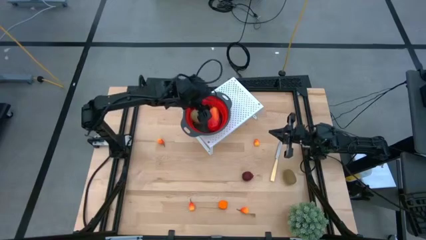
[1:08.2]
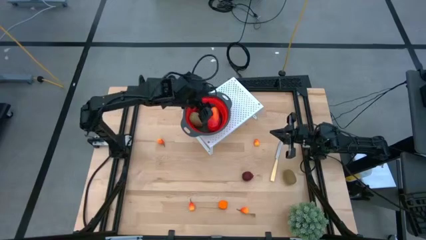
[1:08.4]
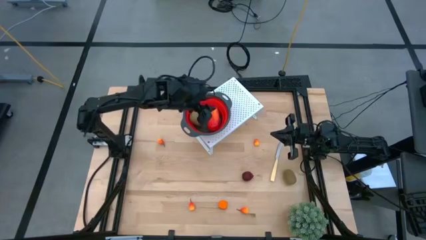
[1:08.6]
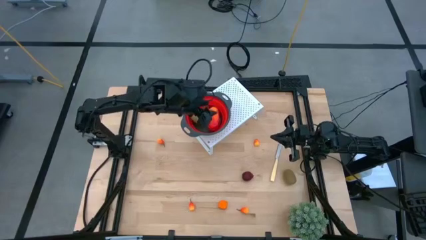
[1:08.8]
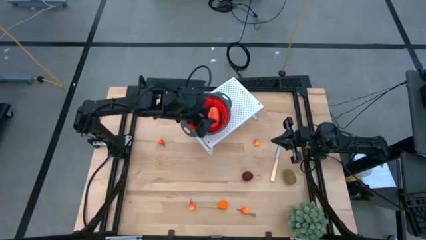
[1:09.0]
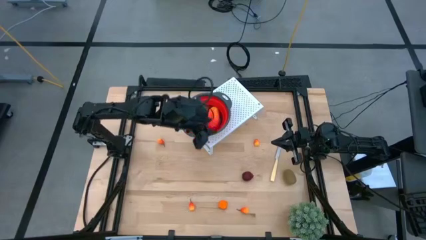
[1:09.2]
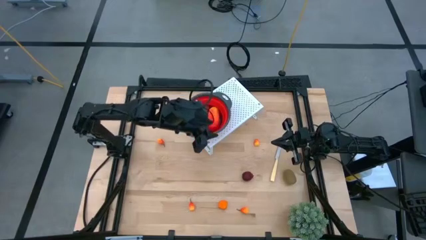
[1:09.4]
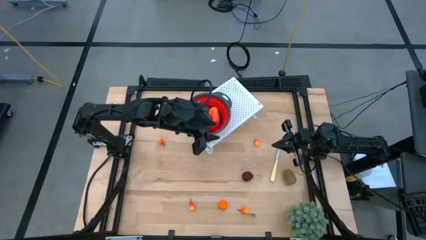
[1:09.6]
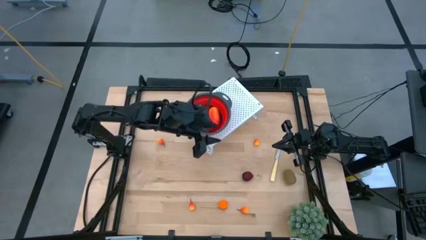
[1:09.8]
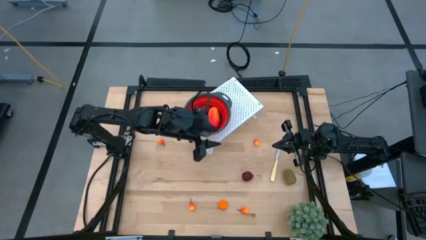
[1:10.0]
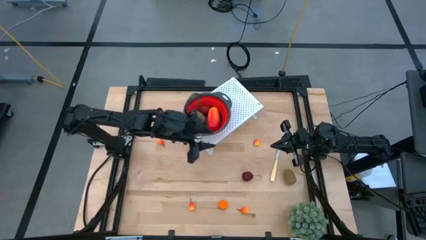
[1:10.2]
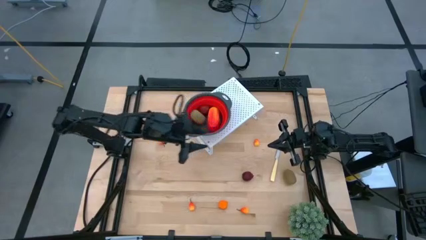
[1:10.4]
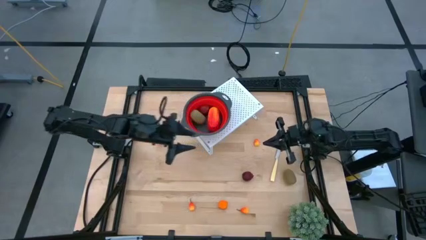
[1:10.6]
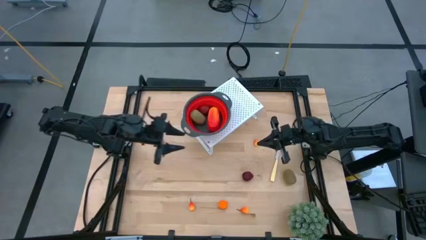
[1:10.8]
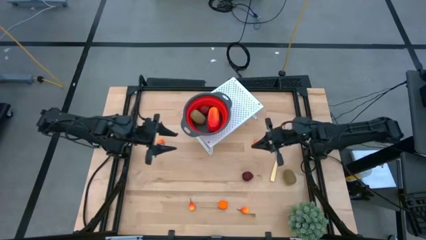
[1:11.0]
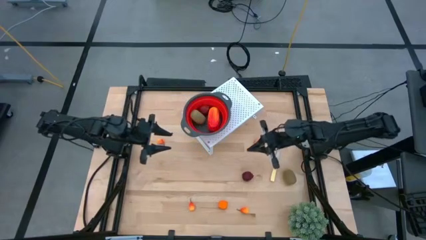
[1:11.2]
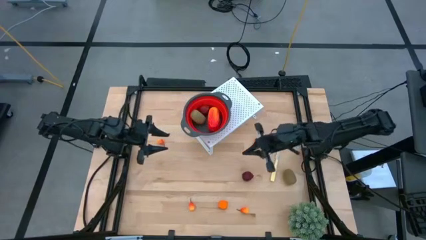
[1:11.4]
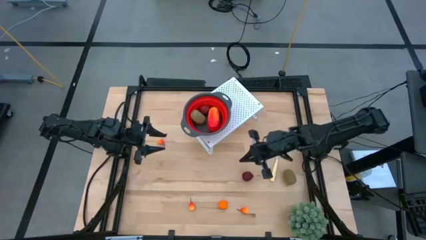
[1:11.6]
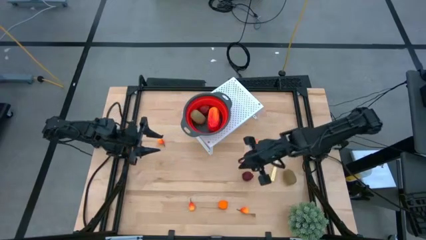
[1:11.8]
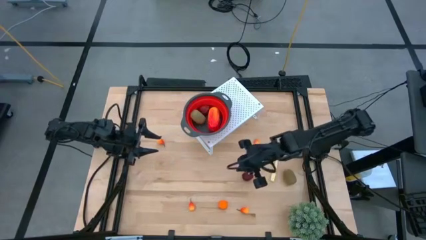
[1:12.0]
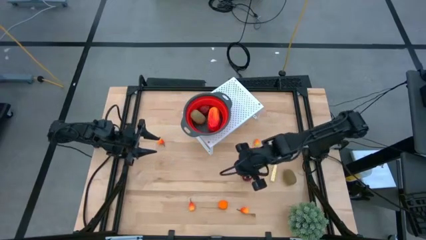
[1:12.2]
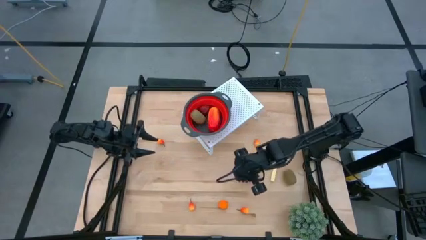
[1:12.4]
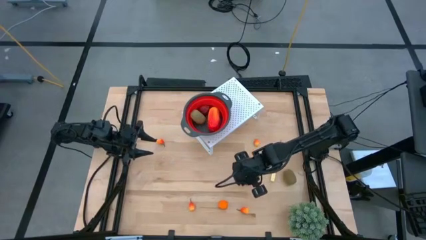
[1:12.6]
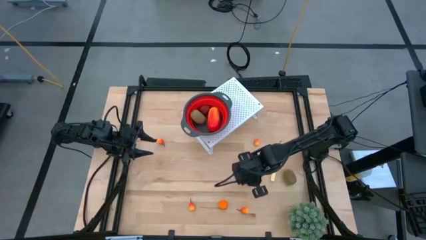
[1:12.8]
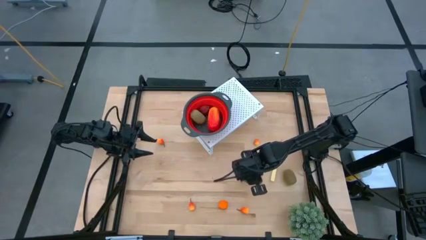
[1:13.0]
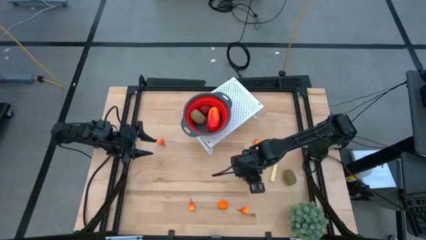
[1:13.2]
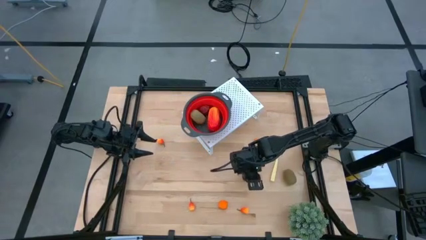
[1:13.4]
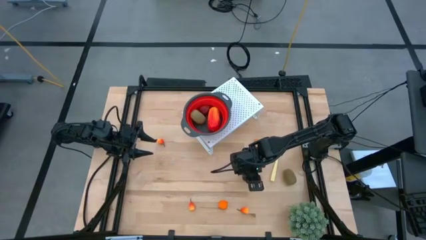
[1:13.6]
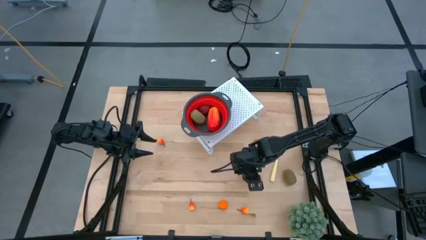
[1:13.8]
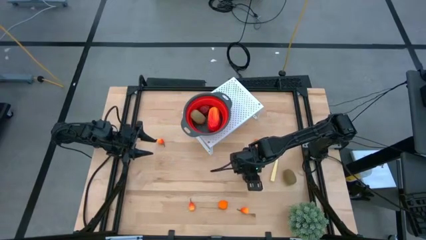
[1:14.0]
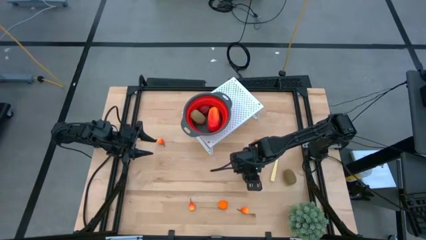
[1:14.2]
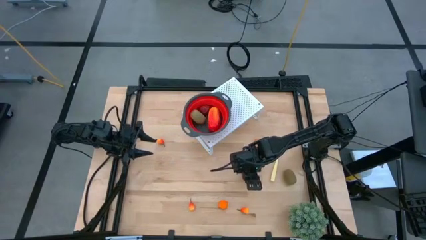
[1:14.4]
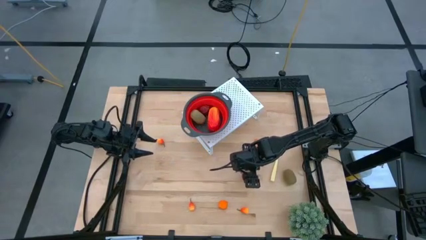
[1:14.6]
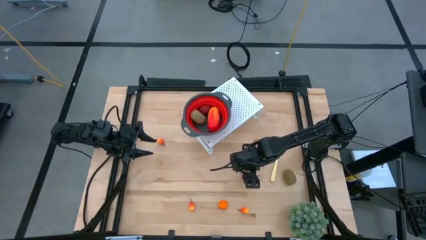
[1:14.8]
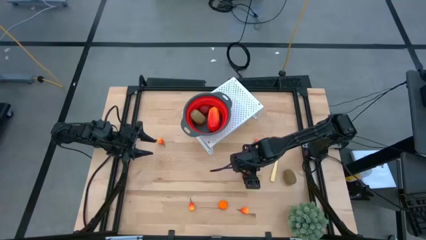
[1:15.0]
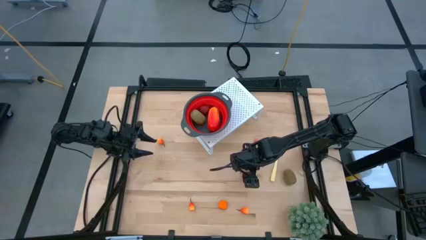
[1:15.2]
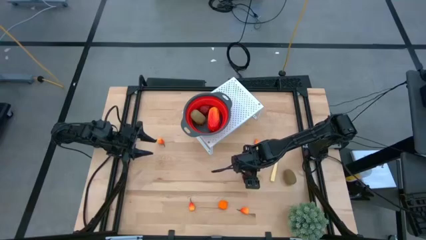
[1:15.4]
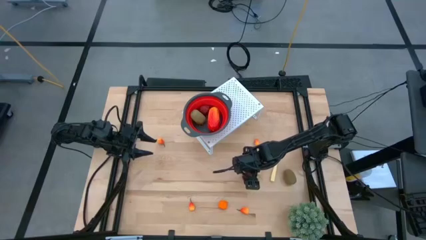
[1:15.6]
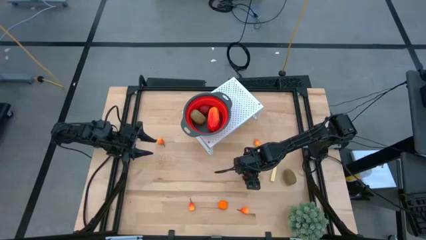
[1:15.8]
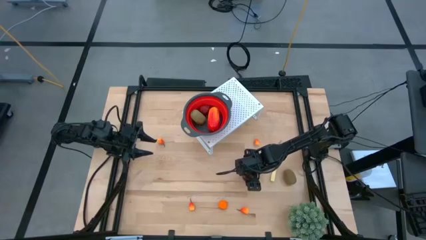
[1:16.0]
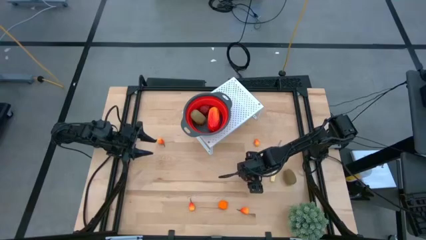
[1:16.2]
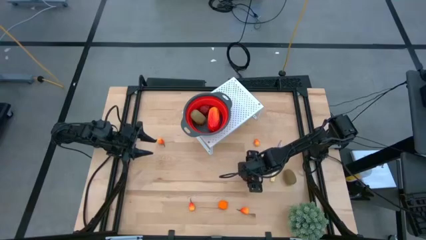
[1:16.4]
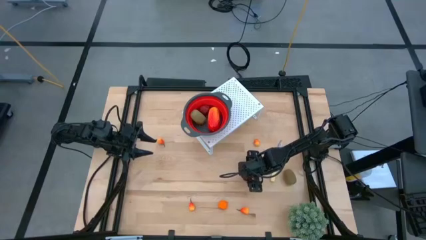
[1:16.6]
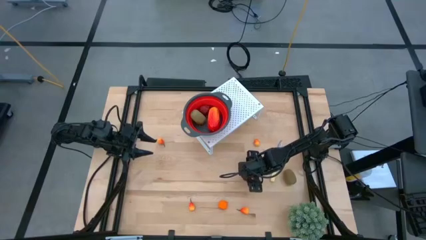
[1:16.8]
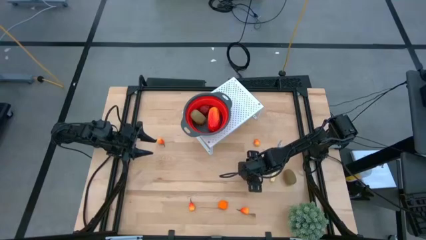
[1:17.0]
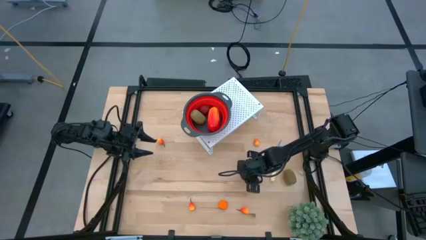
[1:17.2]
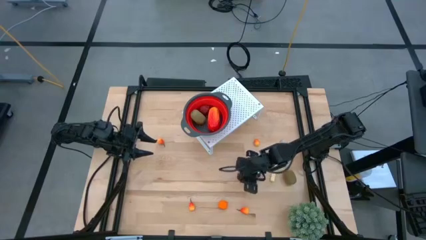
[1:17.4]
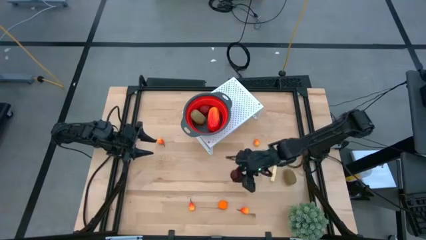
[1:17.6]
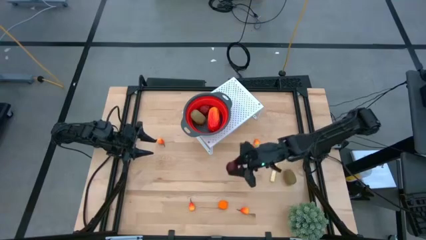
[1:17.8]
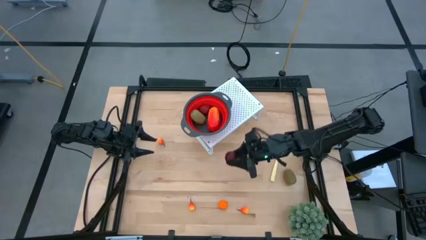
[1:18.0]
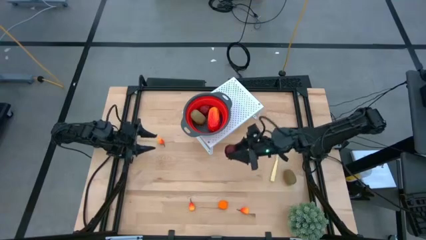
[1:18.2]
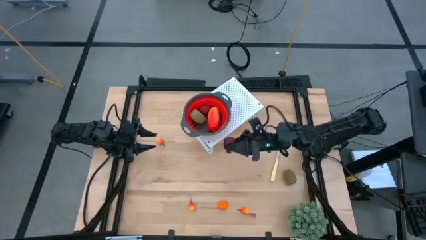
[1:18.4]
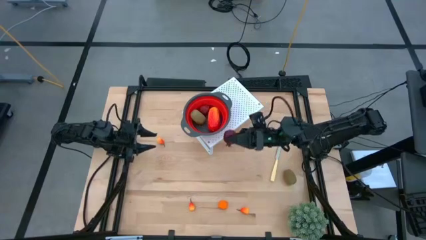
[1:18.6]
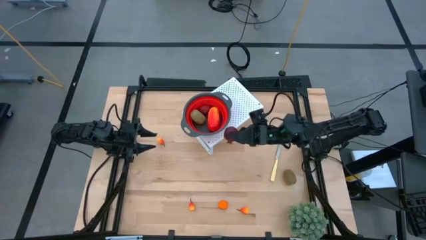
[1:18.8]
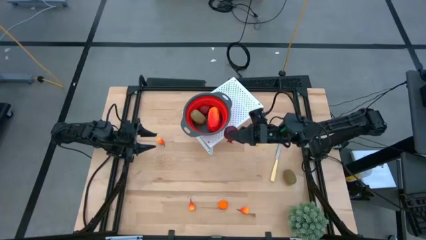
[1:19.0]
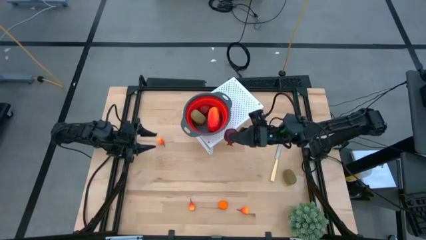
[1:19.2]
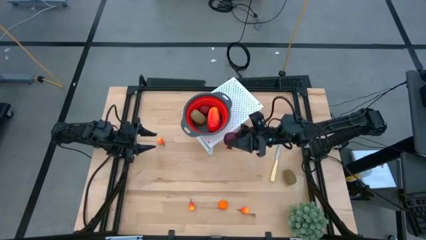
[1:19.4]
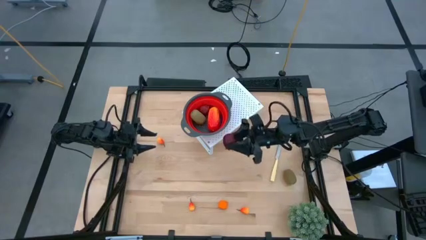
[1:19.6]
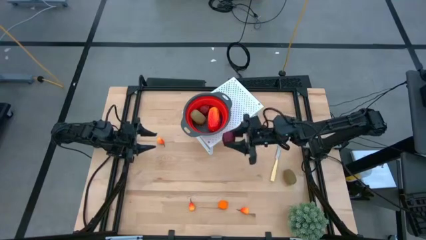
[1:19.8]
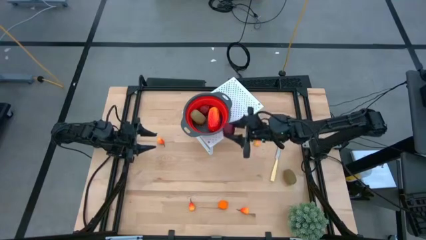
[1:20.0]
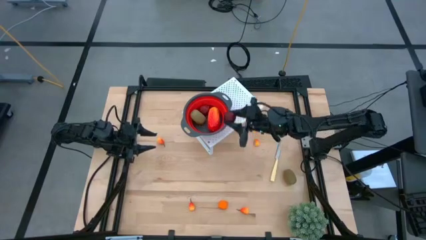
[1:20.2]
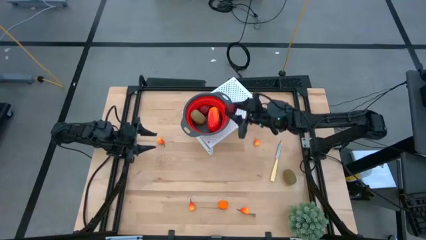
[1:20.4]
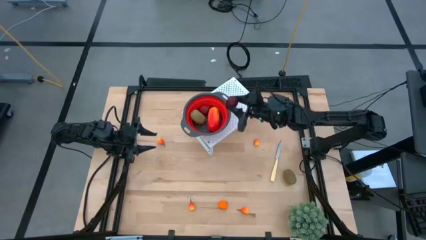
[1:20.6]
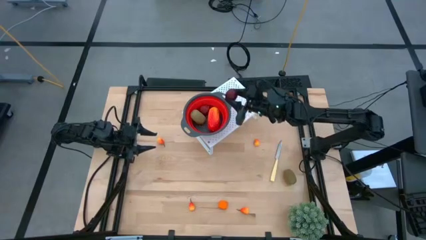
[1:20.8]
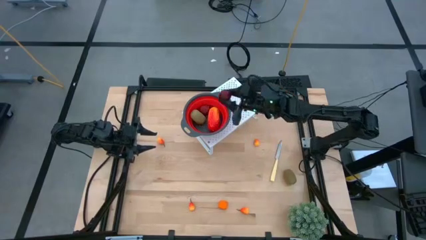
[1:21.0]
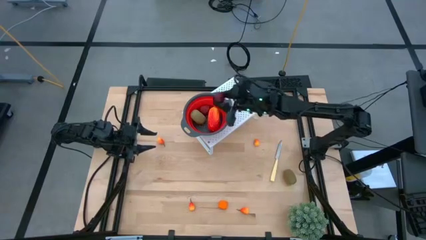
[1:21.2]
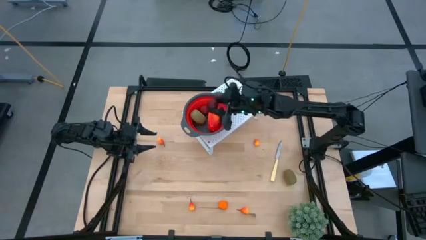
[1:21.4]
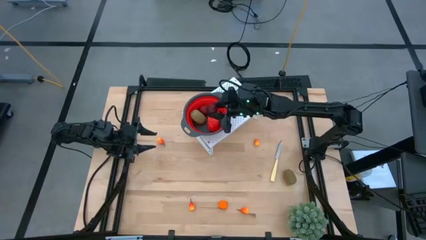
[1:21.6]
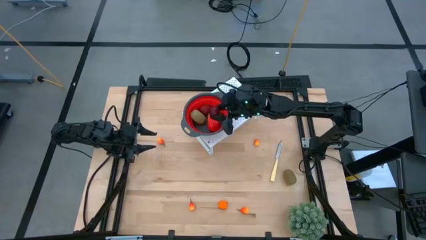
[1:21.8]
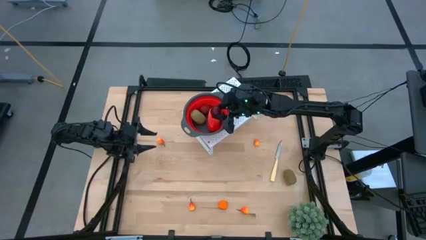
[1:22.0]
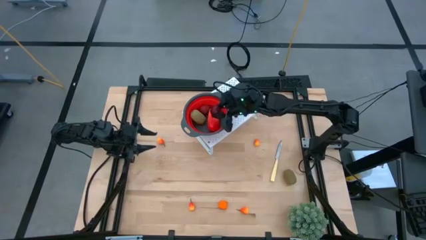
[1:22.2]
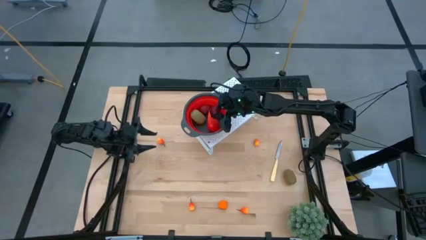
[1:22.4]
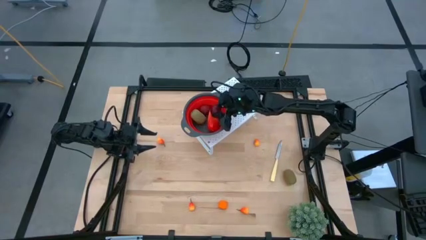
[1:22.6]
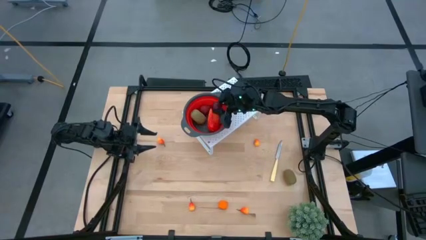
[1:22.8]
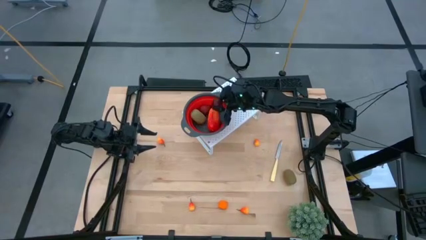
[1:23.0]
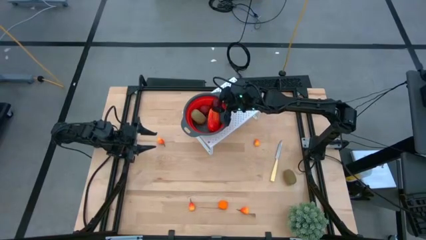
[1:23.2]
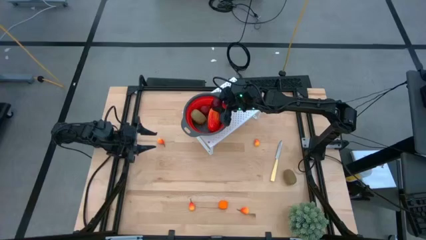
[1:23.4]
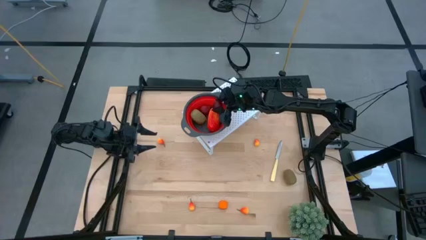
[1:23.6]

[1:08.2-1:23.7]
Task: Pick & Place Fruit
Put the pomegranate into the red strainer bowl on the shelf

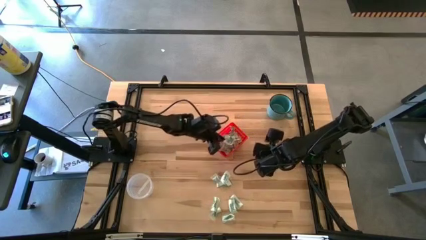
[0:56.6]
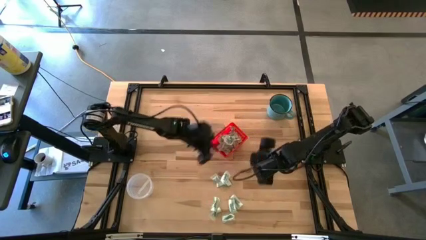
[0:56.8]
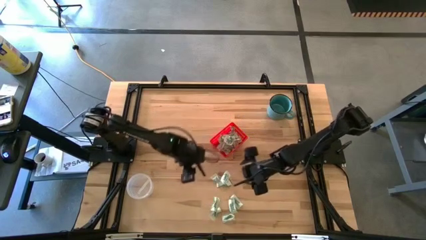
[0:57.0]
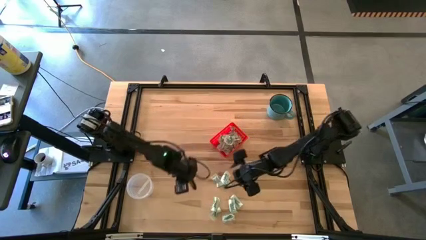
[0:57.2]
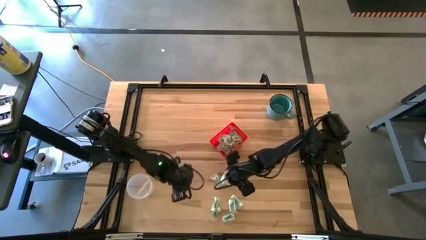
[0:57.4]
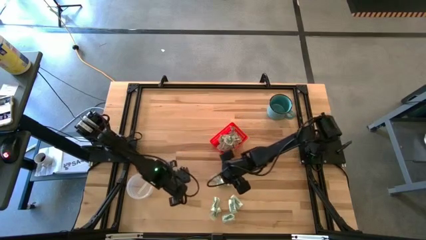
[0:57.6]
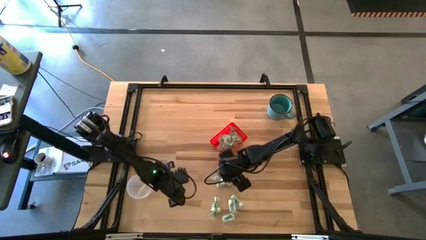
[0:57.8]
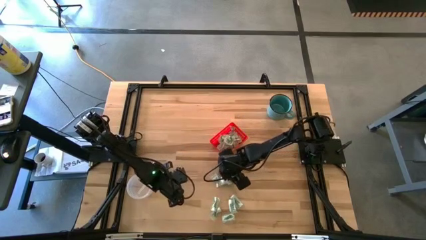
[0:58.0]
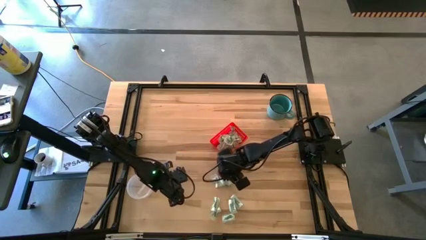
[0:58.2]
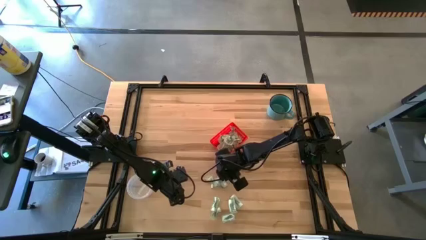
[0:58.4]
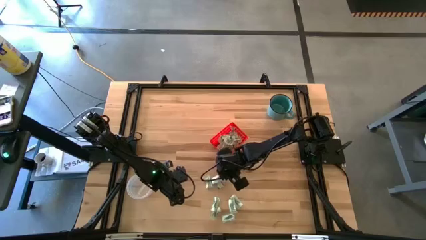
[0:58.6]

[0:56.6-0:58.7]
Task: Pick and place items into bin
Put the stevia packet into the red bin
